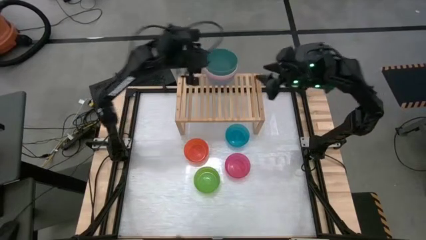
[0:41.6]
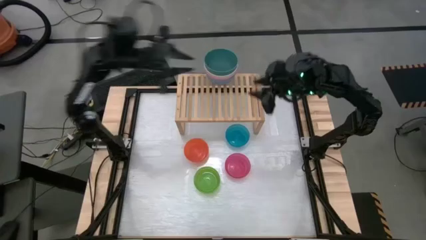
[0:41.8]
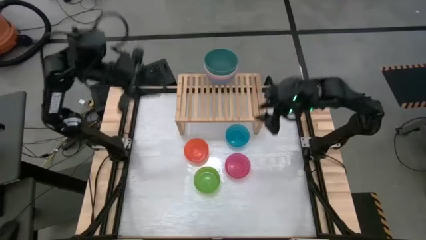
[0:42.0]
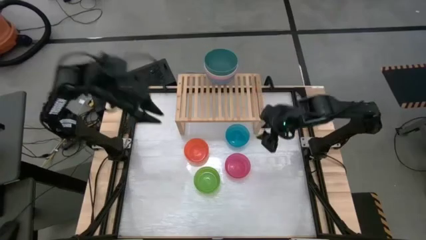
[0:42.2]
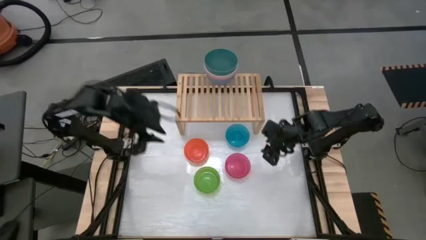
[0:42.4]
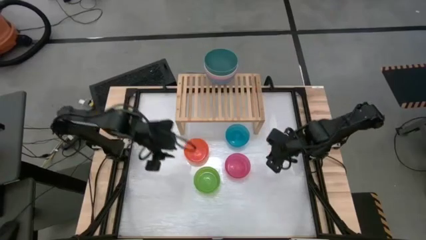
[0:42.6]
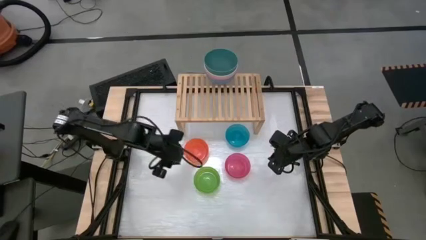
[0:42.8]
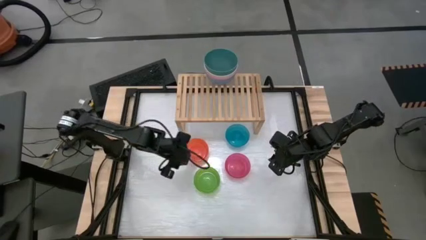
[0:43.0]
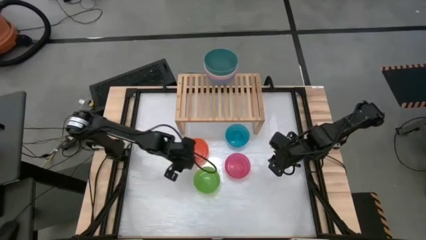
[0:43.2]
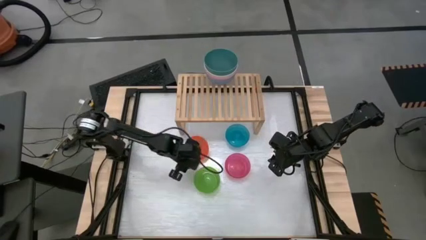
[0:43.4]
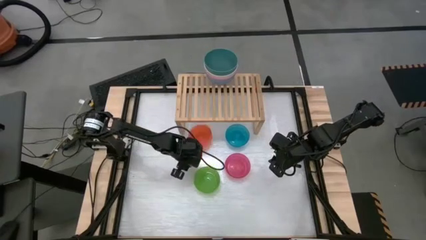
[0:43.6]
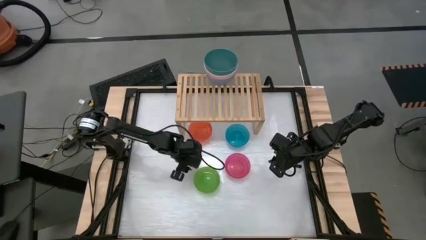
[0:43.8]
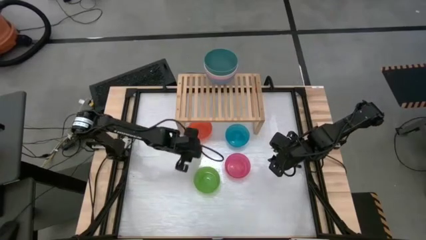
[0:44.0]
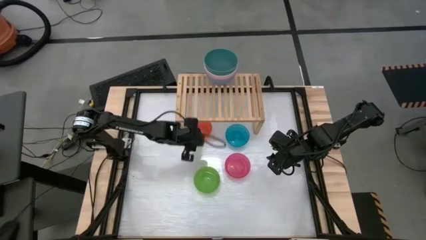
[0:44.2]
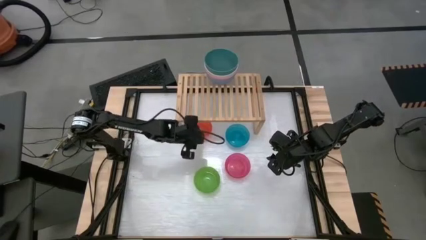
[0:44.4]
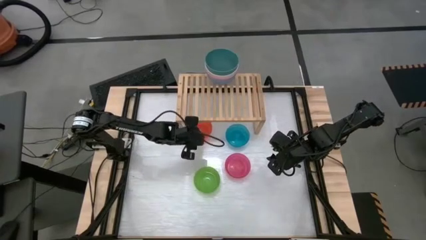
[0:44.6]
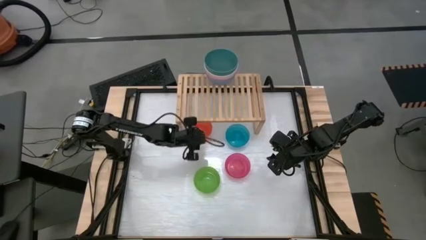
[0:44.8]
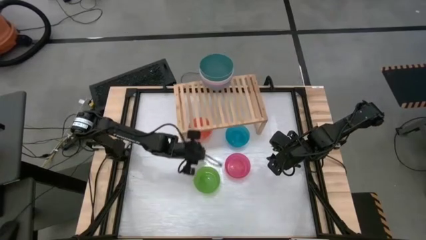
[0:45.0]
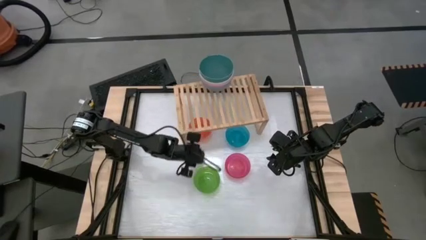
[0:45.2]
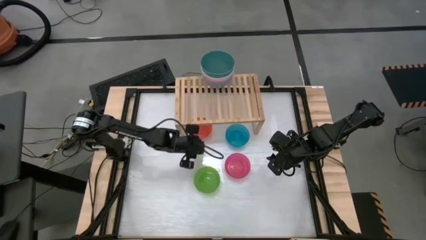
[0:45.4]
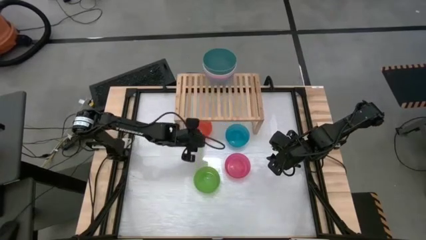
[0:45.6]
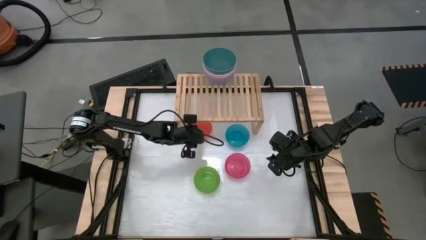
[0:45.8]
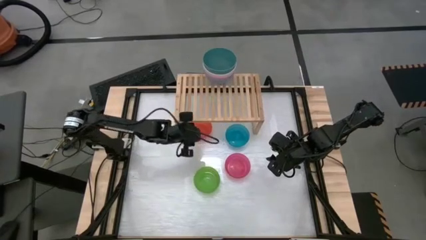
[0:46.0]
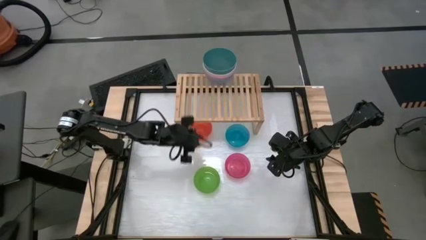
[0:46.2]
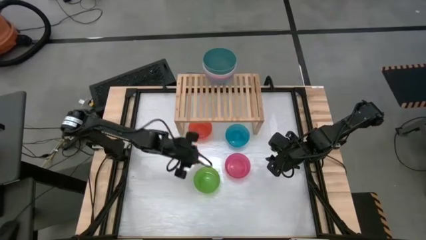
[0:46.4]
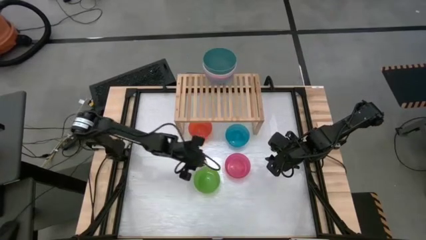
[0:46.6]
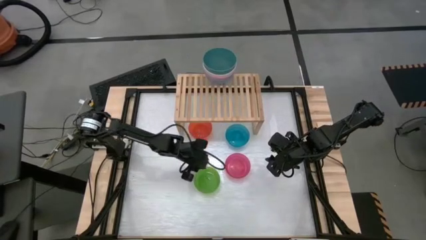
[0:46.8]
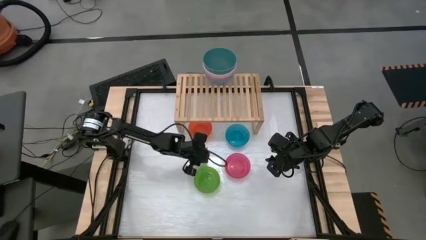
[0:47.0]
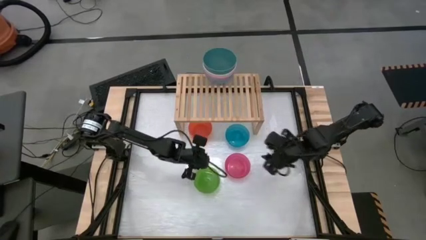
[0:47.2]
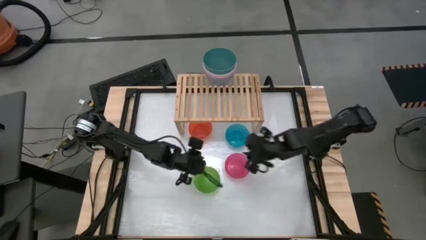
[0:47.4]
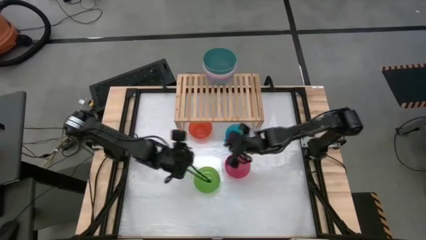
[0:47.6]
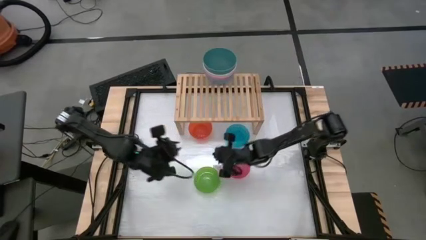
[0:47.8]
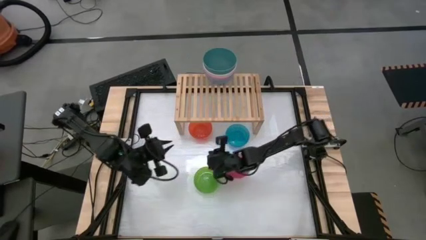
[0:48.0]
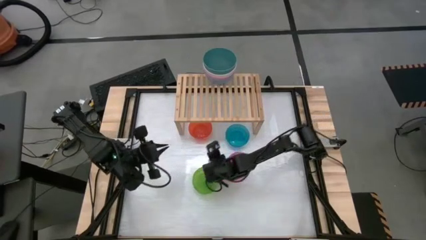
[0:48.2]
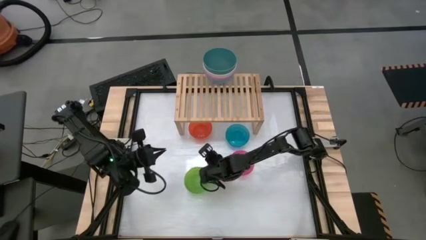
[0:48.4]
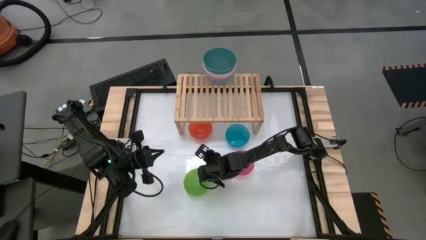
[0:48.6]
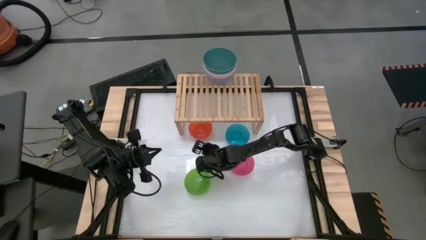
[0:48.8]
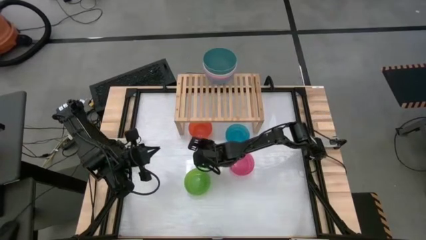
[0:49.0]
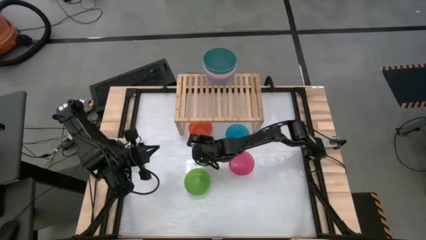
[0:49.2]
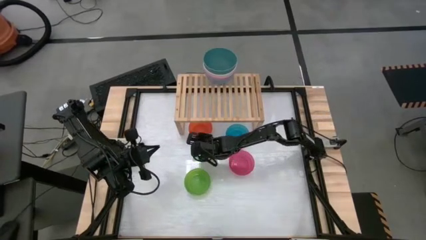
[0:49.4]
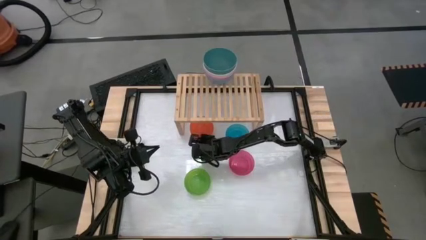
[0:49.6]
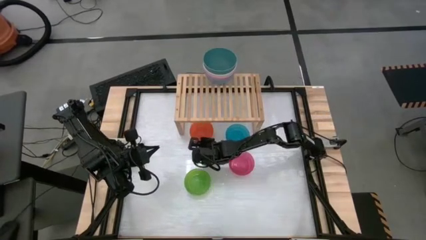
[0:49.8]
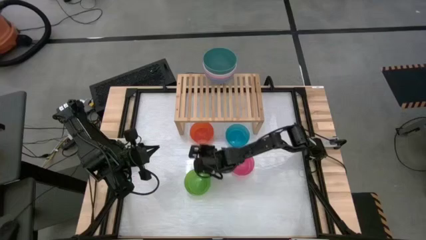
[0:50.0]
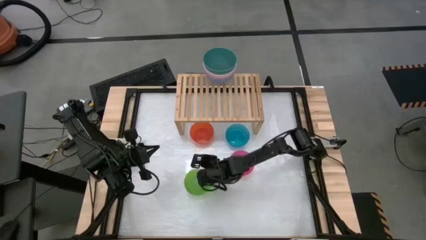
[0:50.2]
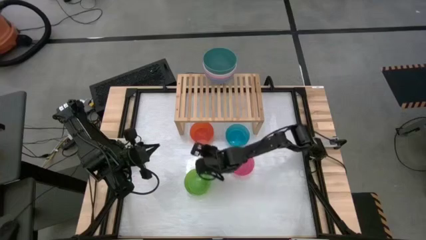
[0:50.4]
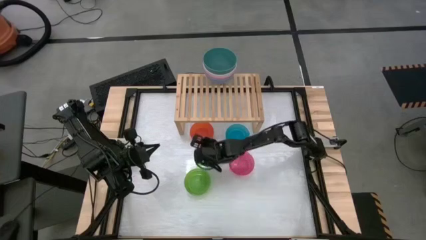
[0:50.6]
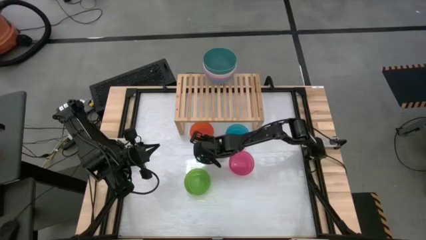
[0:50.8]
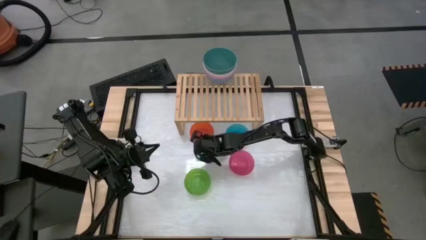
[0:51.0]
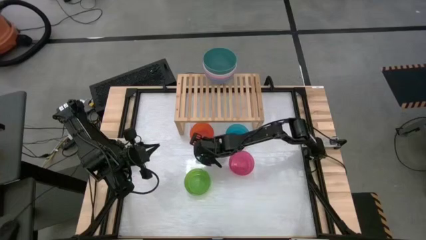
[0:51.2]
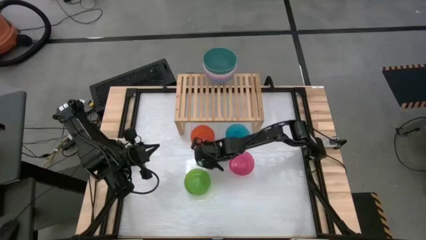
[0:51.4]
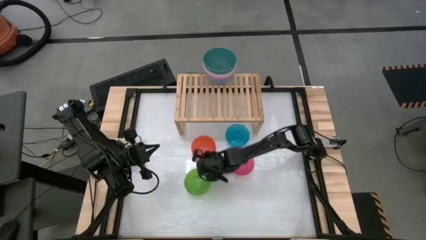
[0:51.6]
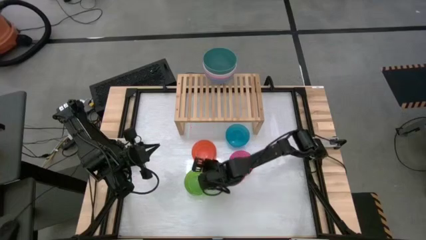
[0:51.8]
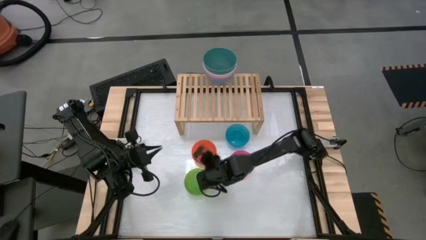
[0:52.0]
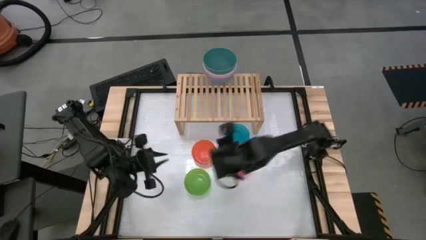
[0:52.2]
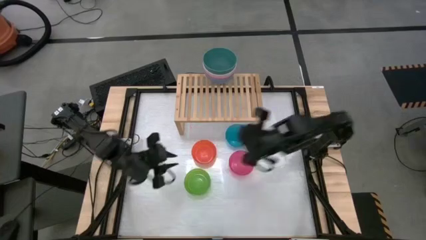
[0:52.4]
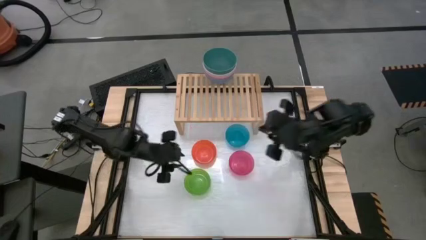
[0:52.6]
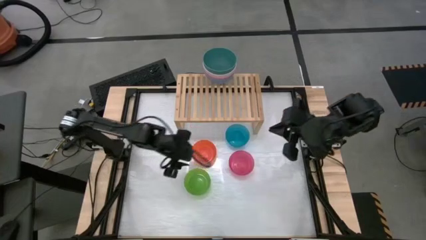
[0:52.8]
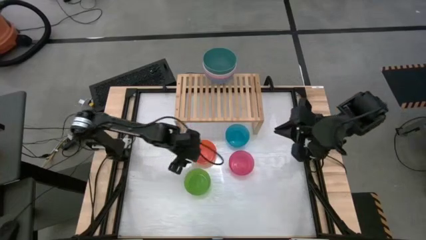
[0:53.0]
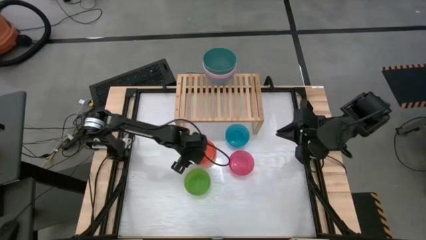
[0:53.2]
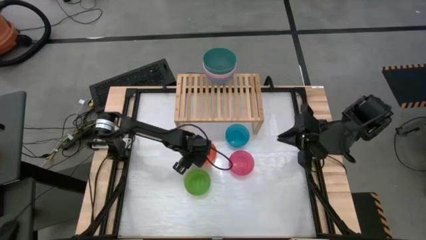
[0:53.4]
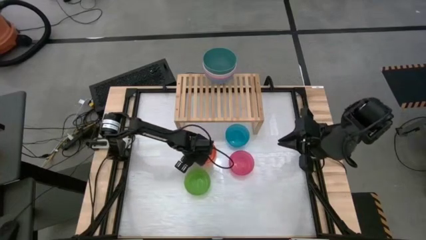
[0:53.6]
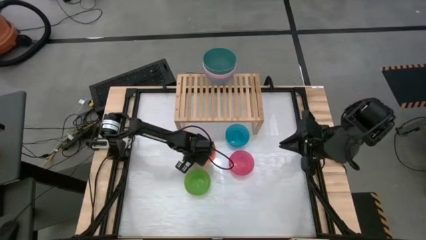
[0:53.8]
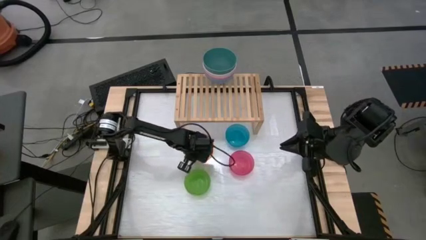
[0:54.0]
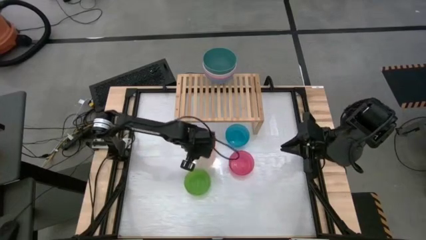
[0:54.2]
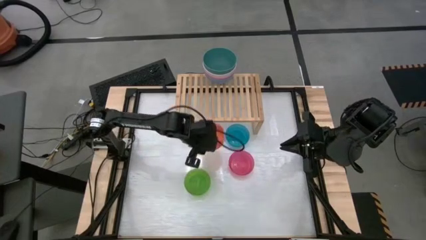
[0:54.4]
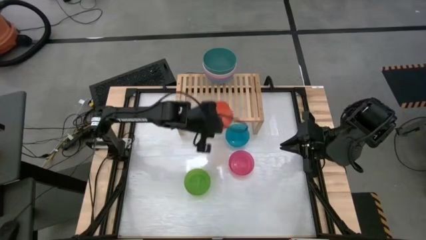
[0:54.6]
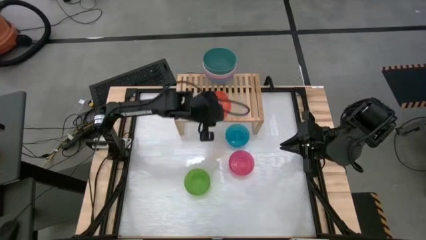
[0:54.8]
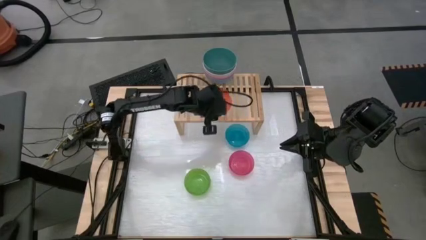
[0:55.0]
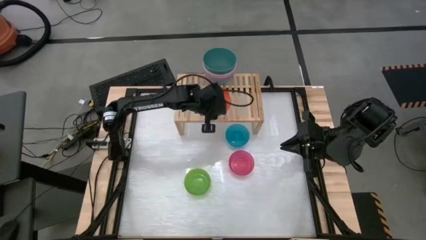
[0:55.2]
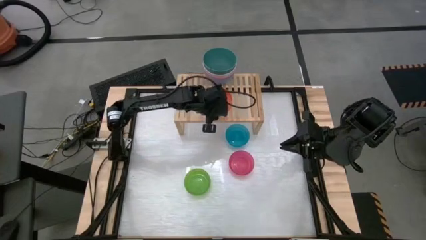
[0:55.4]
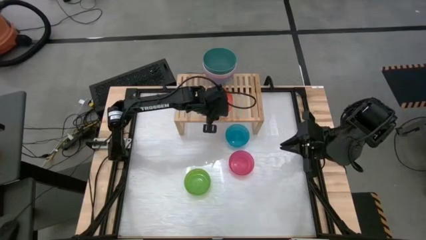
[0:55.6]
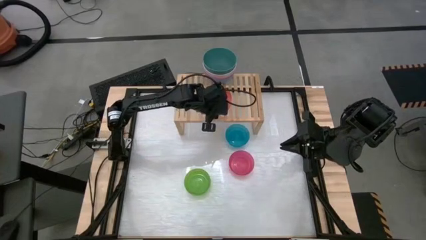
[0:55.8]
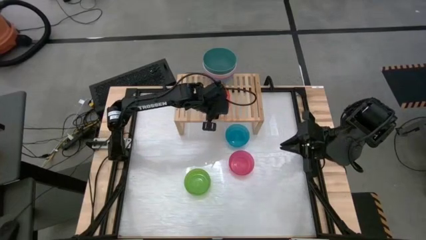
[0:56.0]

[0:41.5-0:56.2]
Task: Place and stack bowls onto a shelf
Put the orange bowl on the shelf
